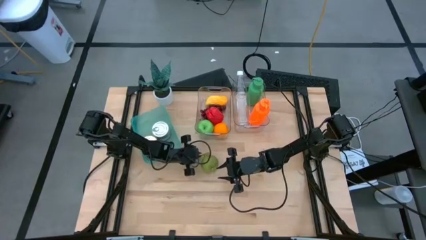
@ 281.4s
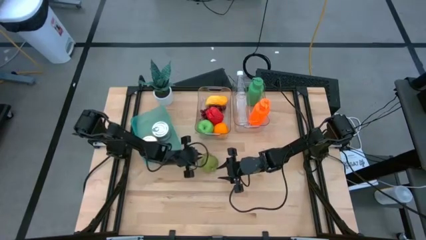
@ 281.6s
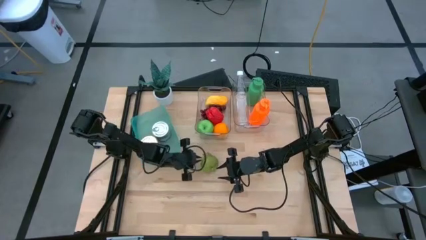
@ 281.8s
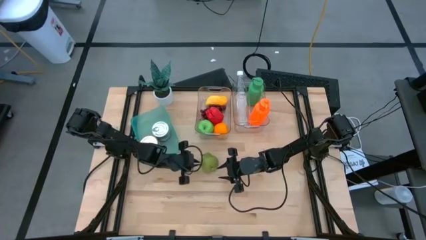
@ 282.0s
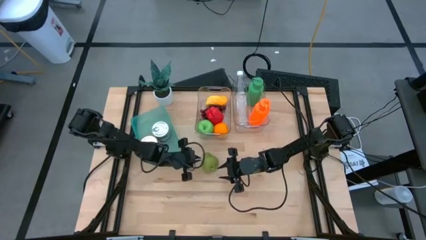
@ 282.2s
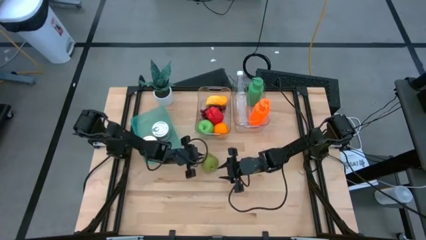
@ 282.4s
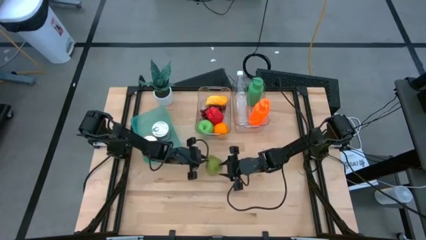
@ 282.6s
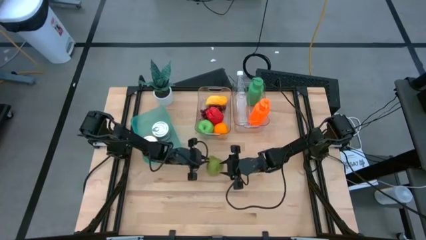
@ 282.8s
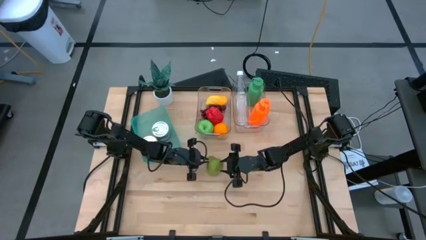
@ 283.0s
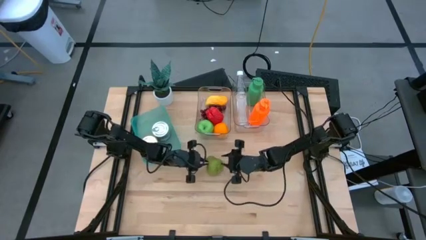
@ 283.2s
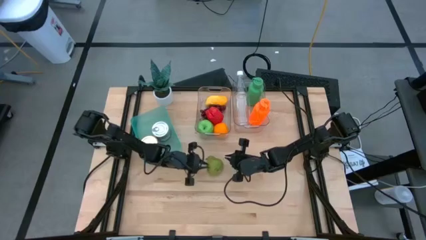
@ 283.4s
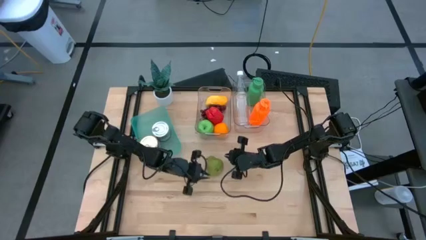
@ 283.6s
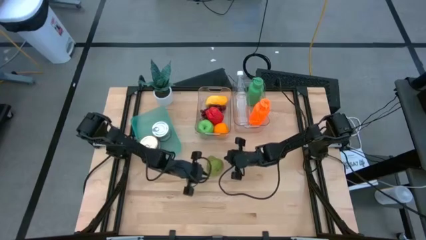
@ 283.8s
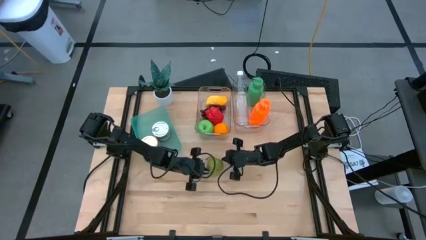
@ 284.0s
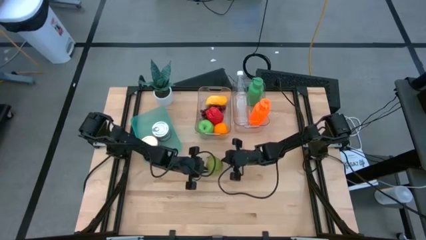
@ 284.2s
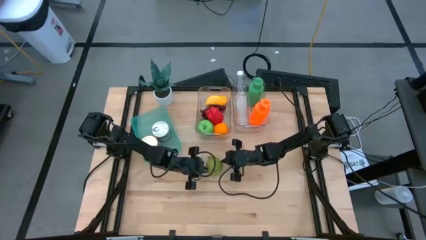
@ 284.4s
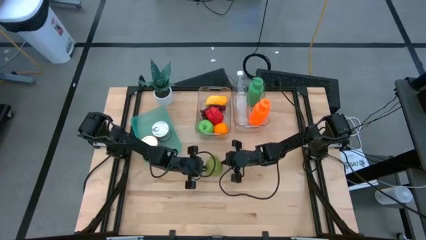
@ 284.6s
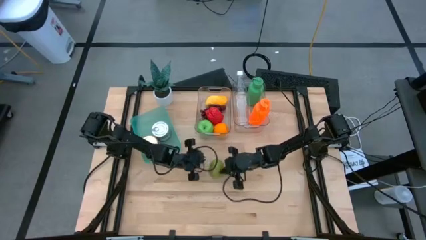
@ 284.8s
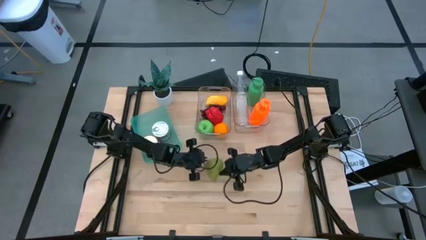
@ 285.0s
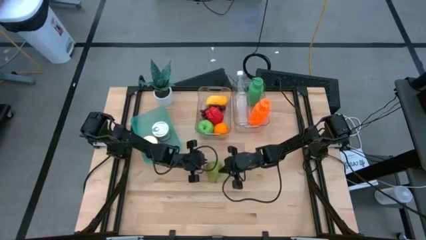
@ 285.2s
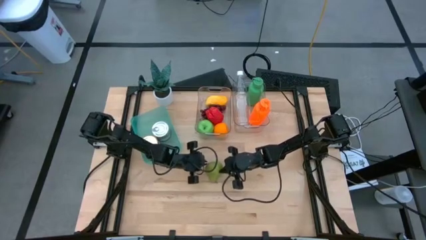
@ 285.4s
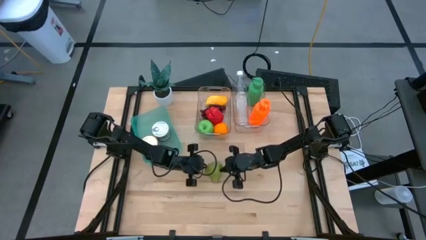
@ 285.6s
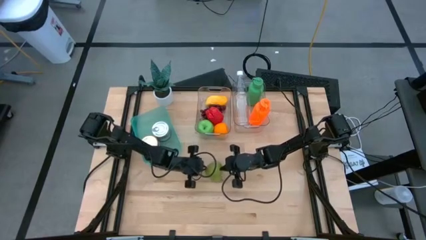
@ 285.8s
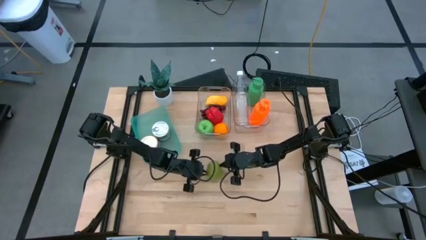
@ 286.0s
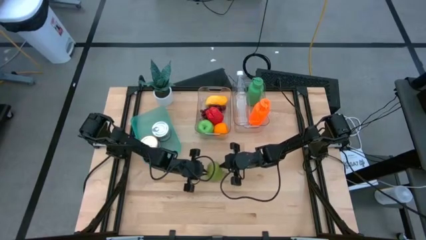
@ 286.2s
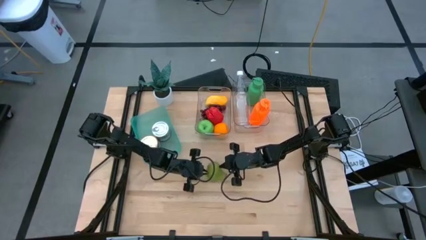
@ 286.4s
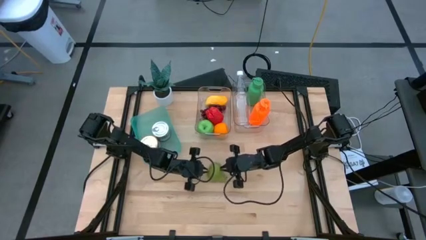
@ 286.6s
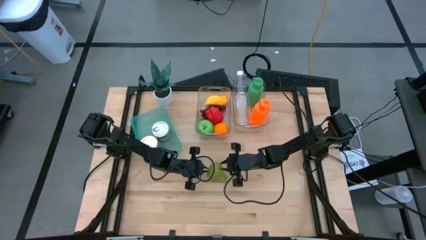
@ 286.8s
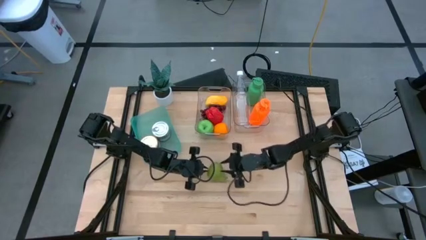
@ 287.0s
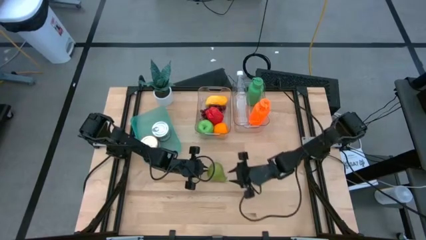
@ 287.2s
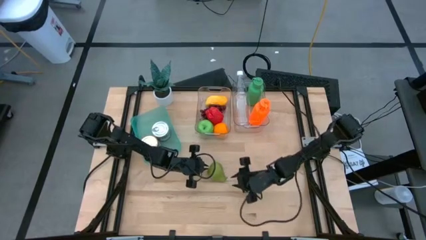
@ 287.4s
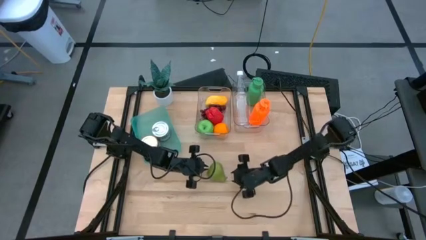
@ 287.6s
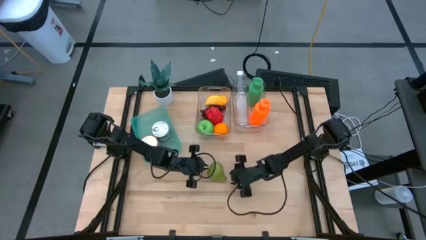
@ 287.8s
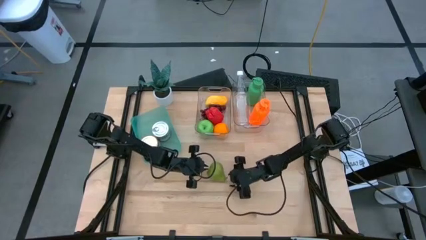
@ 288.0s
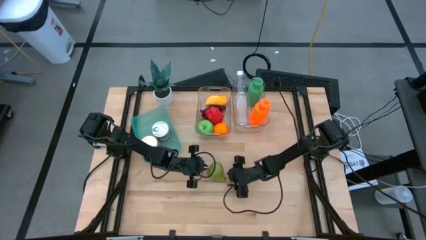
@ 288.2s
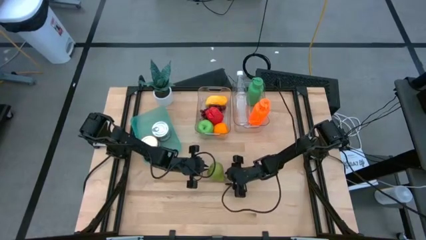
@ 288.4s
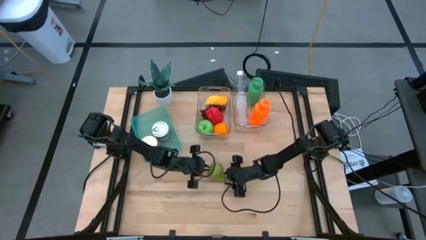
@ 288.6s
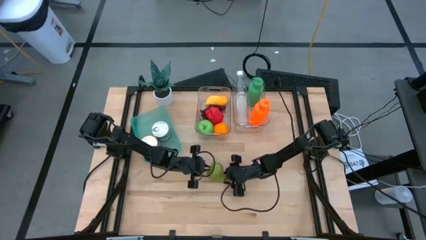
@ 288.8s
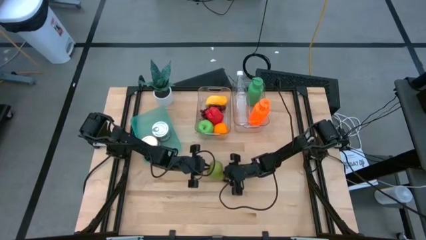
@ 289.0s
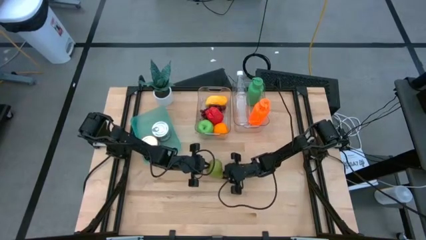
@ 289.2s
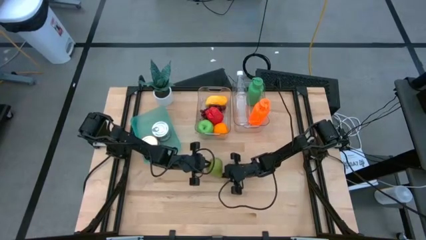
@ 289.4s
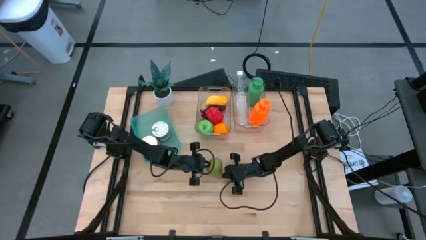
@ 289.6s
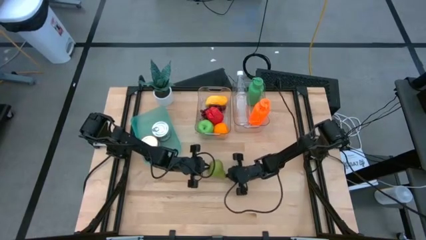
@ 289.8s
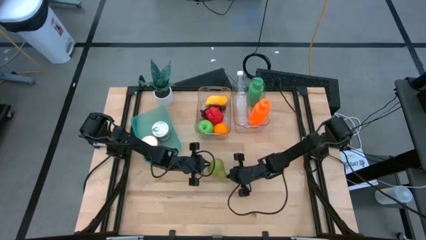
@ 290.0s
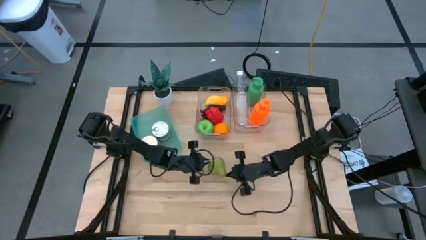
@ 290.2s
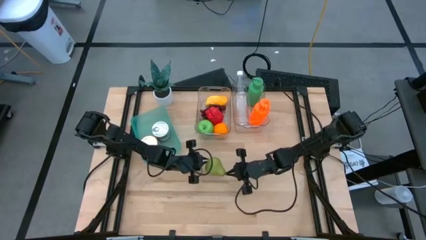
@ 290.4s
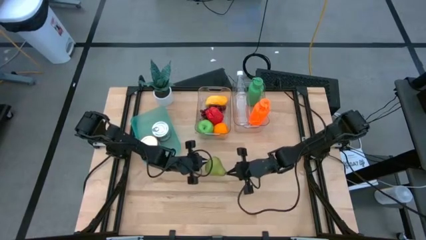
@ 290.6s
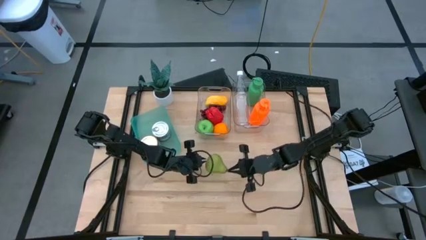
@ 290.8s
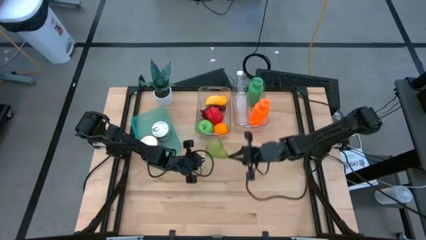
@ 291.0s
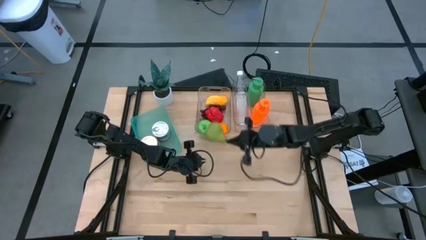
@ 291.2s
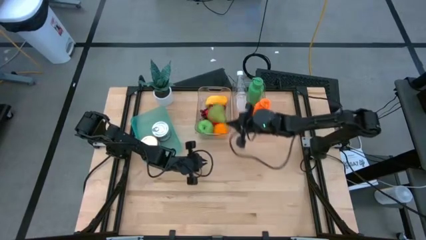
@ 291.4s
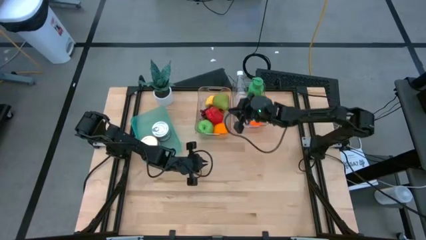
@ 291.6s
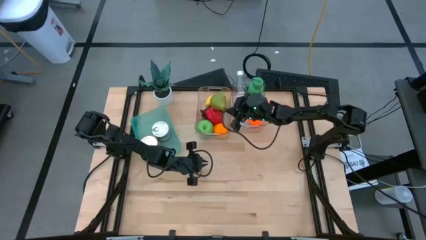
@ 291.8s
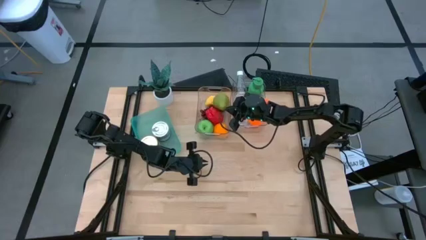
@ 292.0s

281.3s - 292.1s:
Task: Pick & Place Food Item
Put the pear into the left transparent bin

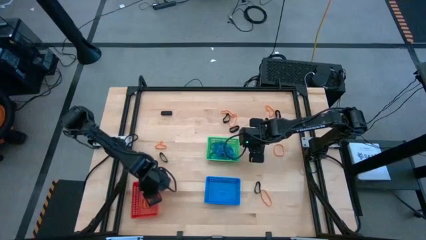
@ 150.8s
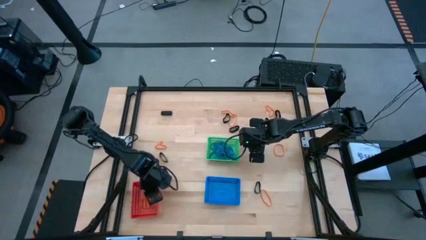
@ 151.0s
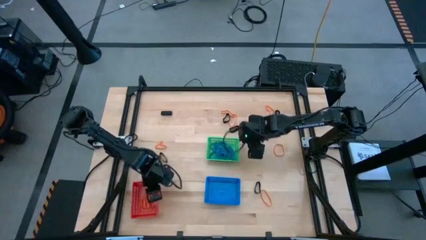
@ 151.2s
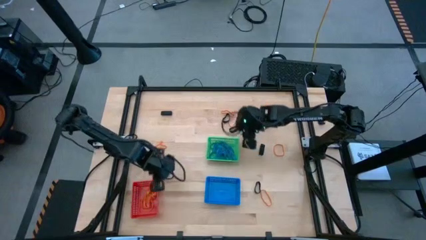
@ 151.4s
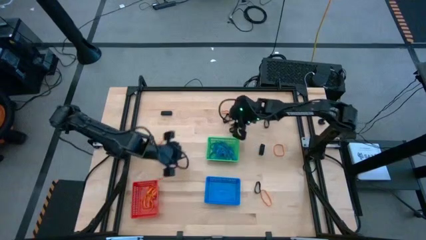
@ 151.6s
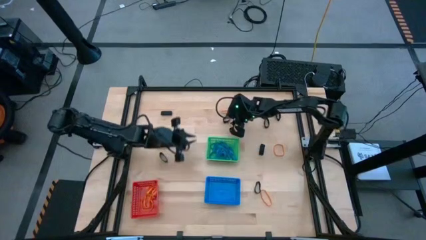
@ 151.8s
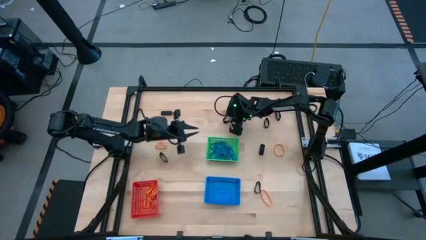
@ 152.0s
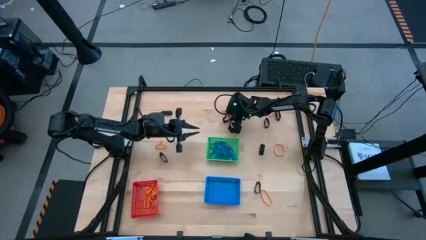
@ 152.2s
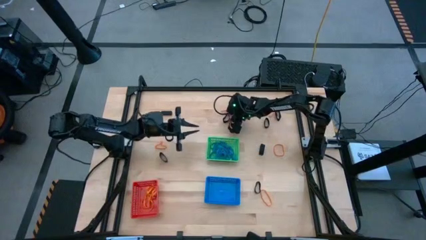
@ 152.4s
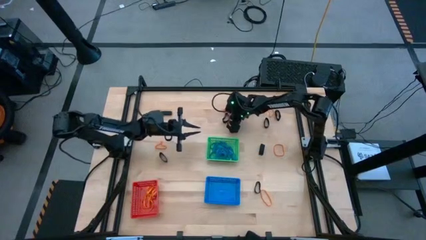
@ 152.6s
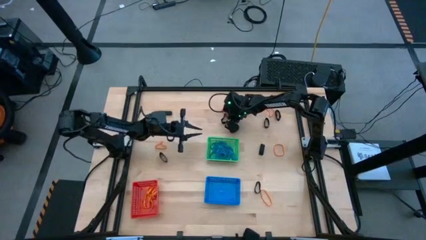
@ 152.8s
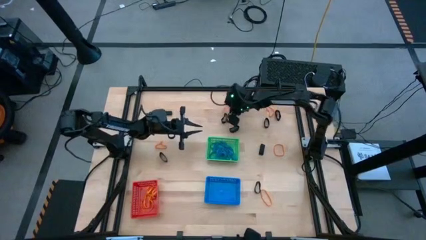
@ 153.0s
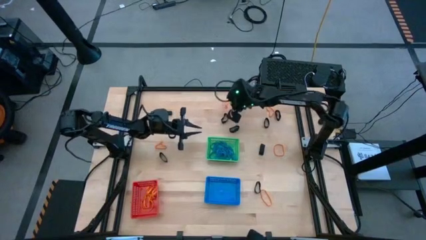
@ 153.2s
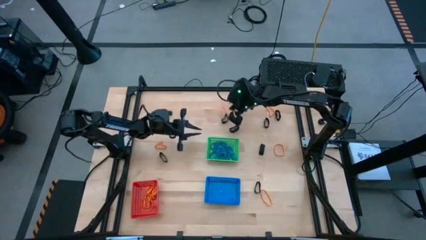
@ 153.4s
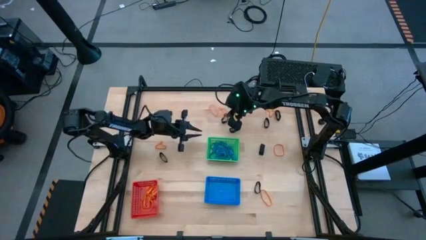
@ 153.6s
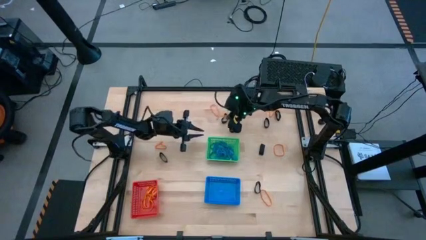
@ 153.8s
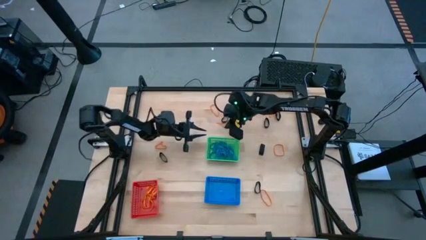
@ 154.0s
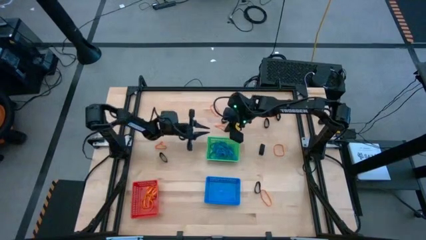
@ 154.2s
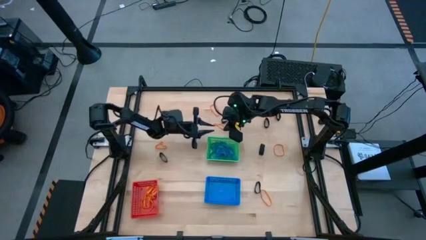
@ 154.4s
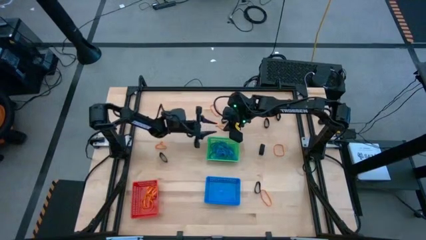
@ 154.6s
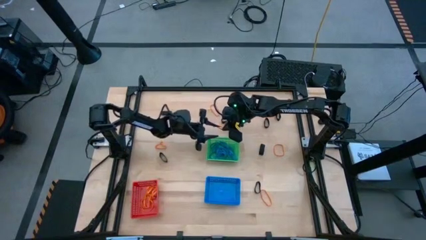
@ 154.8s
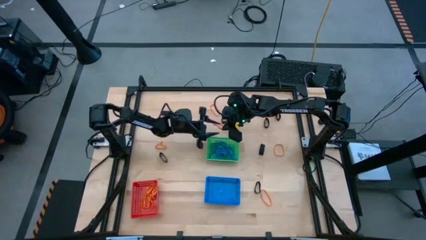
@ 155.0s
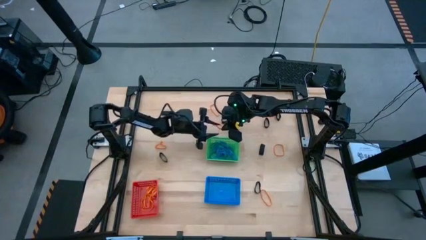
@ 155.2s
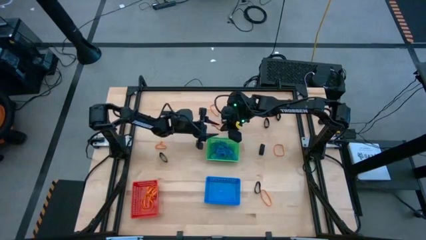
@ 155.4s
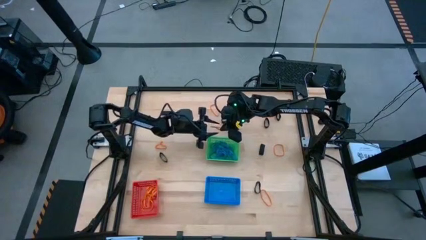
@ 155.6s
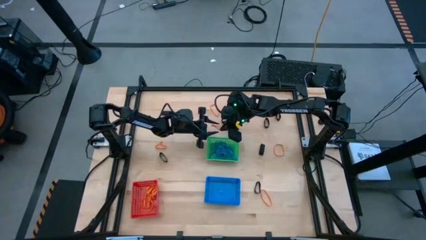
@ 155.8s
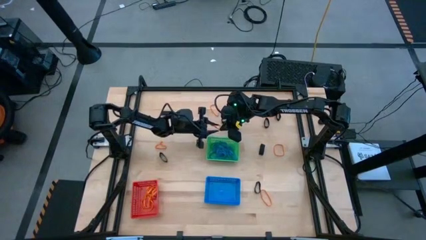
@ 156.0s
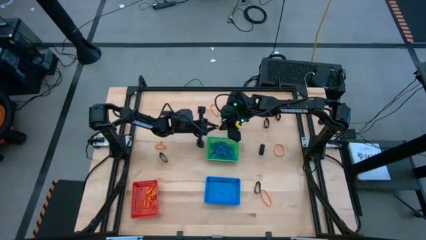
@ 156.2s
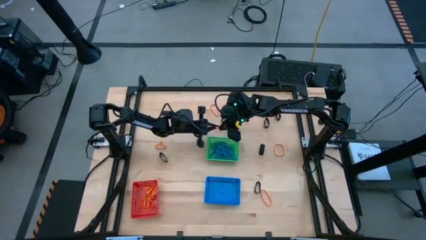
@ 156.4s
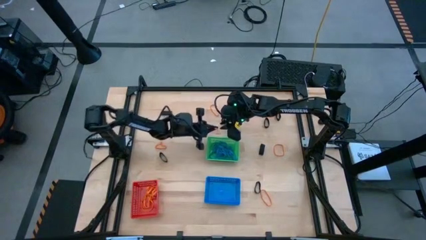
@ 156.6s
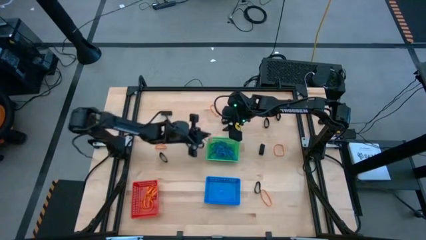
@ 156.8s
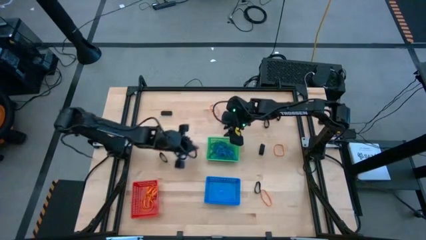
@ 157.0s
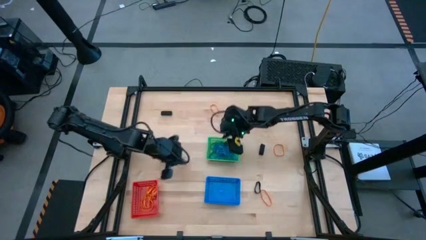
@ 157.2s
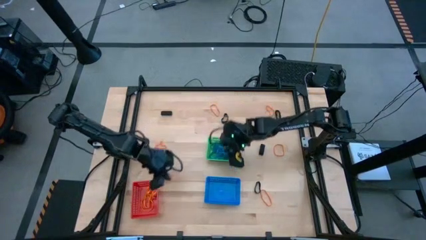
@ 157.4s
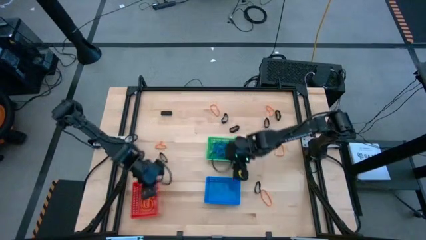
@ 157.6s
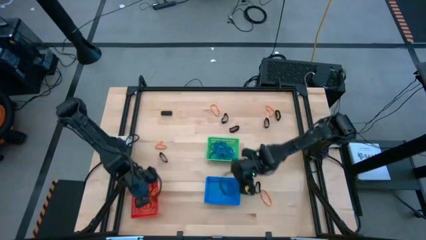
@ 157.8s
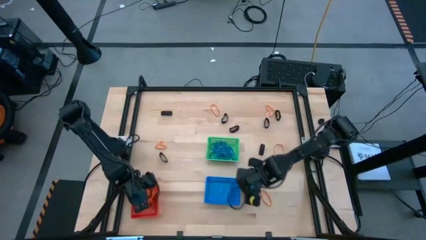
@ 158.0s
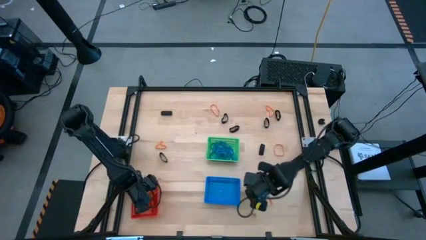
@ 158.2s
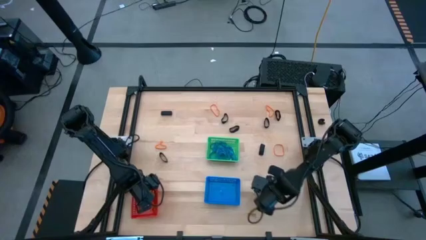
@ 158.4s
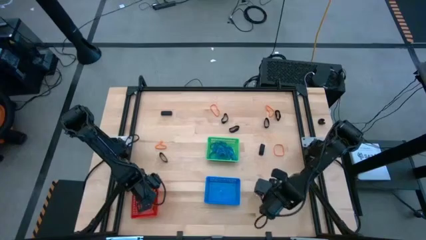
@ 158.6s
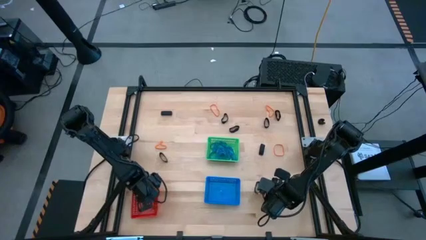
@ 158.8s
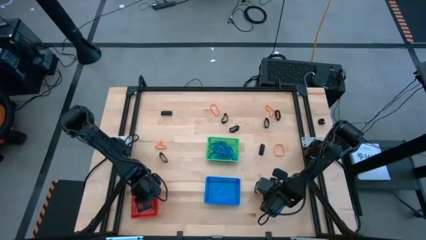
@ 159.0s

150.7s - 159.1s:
Task: Sort rubber bands into baskets
Put the orange rubberband into the red bin
